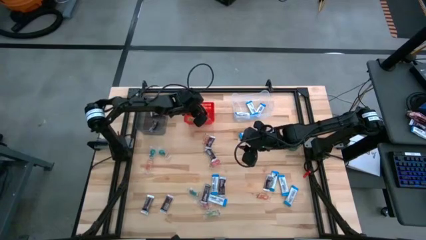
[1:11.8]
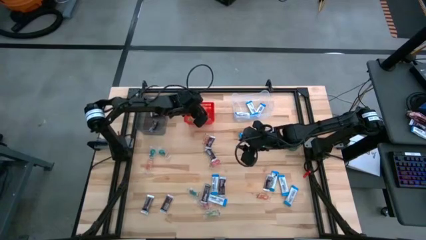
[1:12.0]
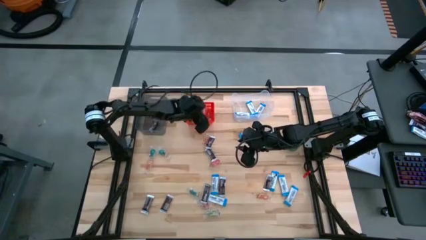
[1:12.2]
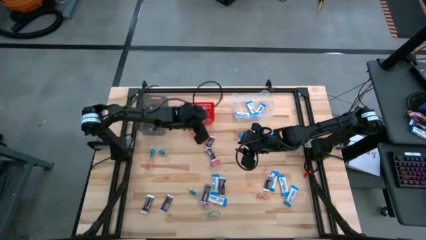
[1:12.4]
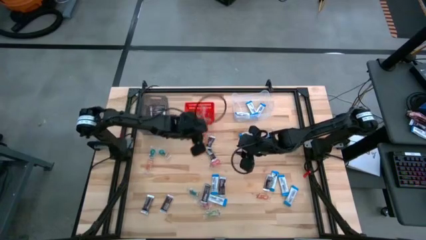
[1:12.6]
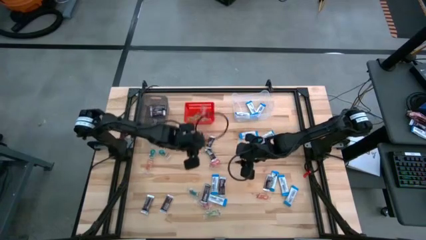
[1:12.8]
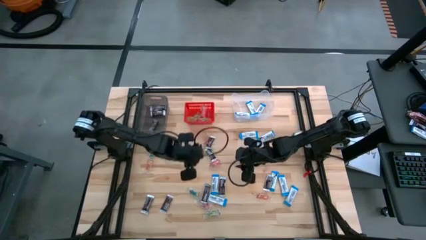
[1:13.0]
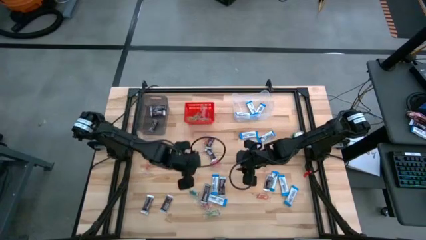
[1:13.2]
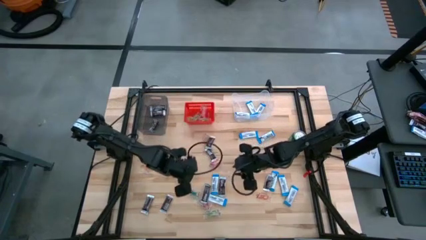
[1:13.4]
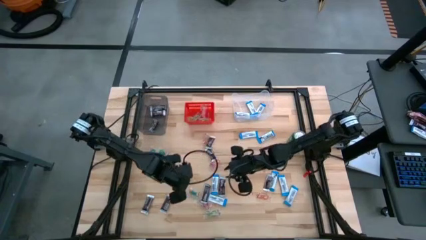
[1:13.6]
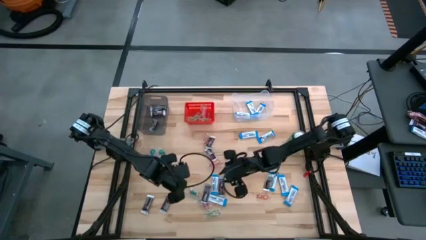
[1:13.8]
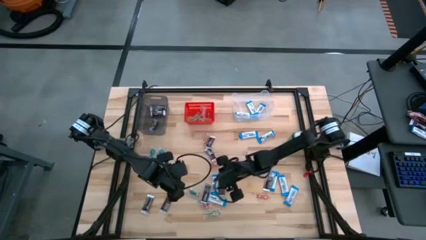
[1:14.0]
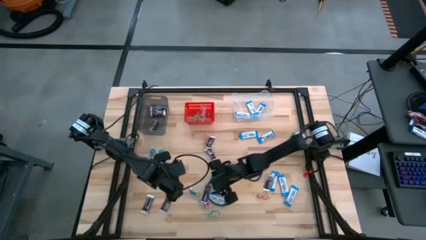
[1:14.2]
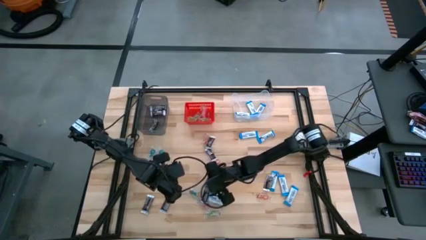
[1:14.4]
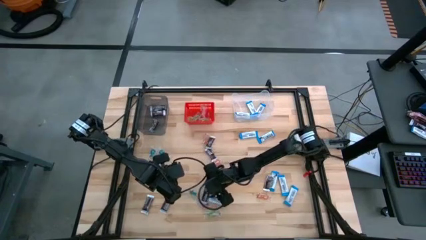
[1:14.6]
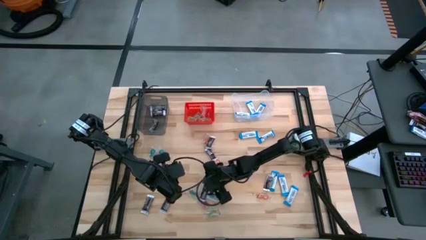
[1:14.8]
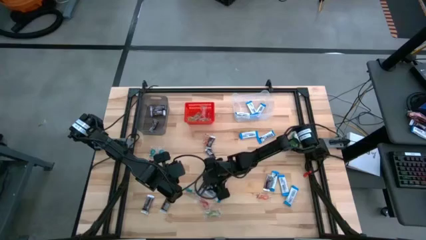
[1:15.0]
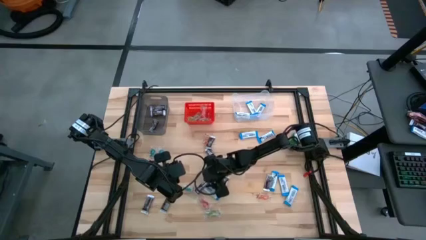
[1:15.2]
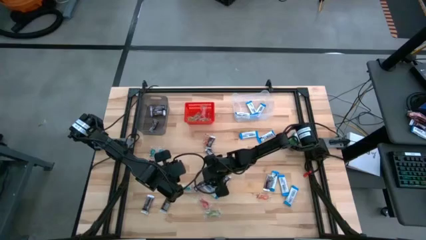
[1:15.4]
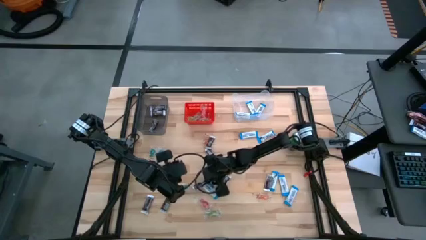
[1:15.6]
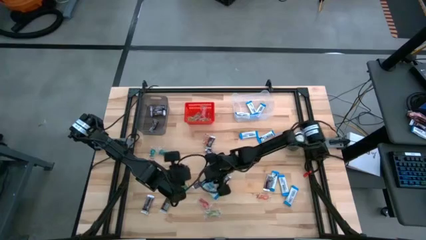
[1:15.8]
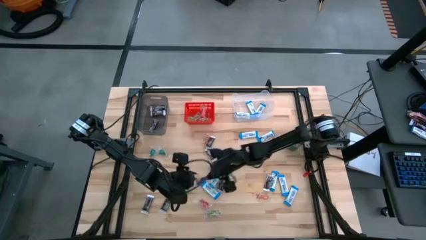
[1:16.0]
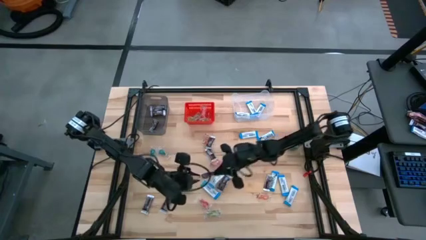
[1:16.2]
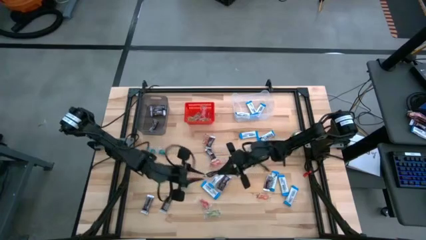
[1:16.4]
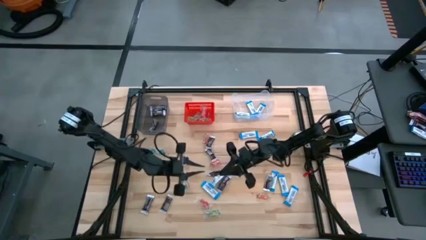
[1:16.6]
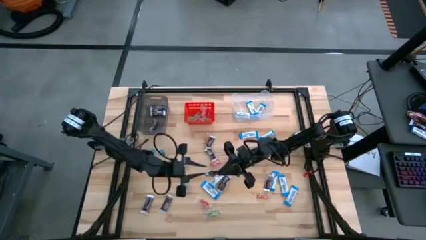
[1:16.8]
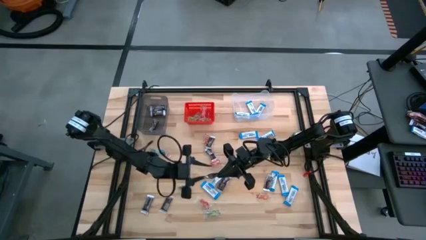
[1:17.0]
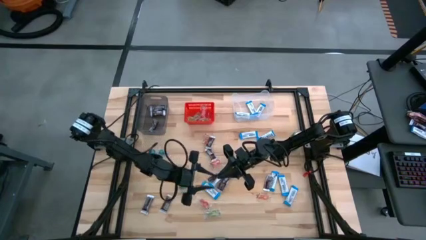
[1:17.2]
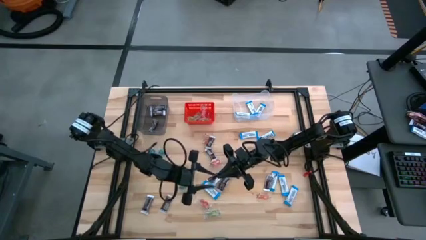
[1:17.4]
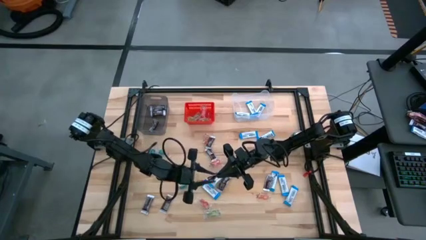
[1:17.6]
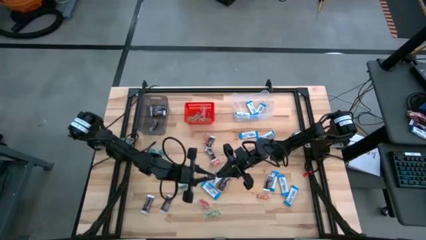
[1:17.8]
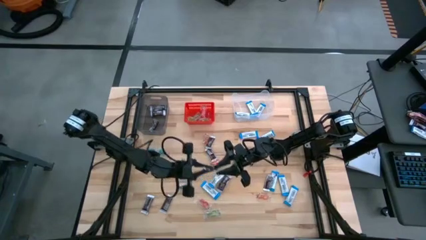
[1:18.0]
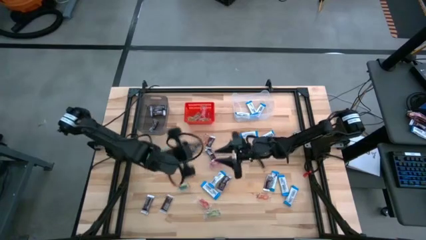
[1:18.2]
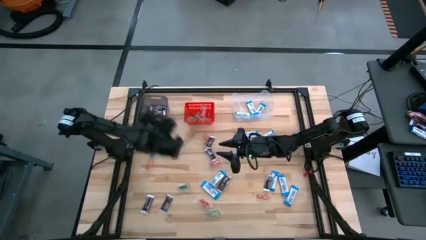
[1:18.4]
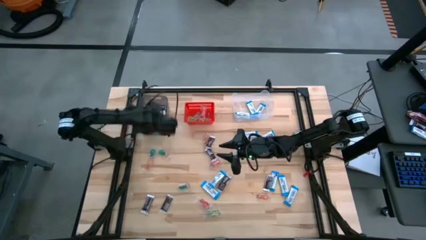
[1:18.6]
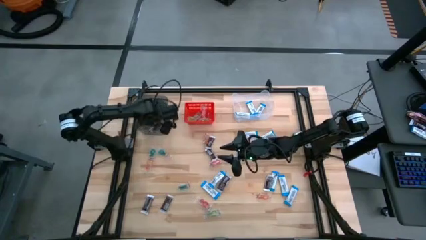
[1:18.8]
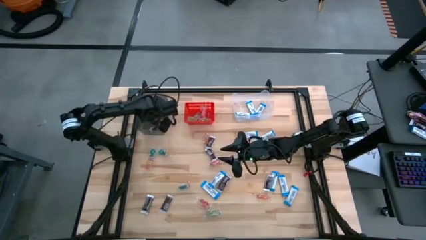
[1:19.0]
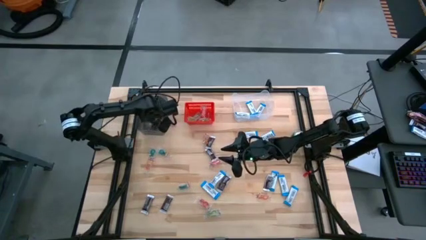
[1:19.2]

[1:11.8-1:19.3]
Task: Sort candy
Put the brown chocolate into the black bin

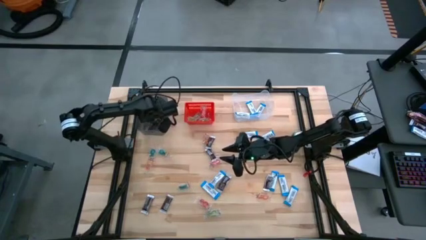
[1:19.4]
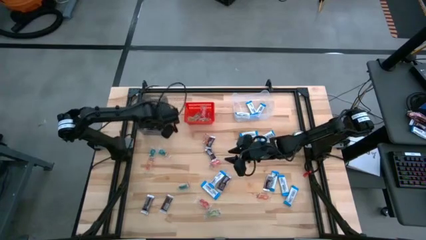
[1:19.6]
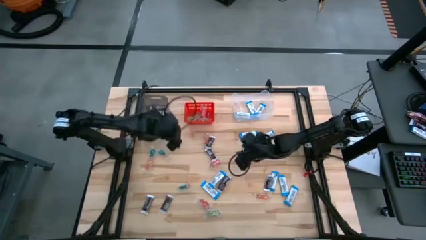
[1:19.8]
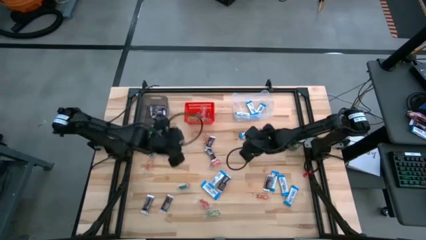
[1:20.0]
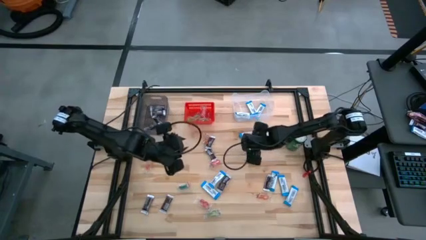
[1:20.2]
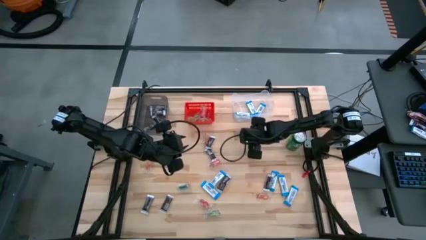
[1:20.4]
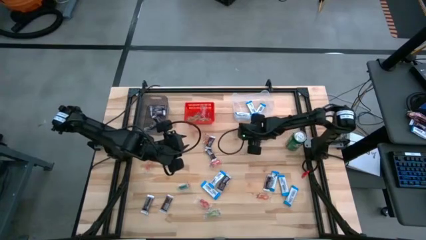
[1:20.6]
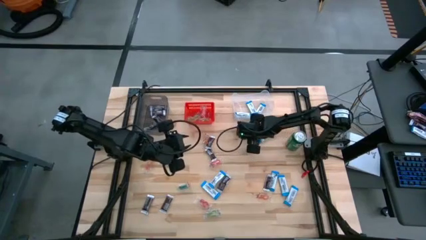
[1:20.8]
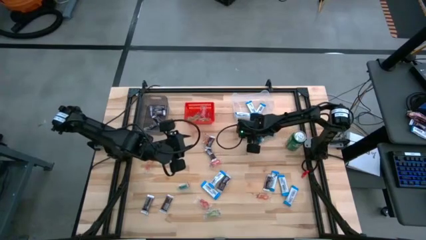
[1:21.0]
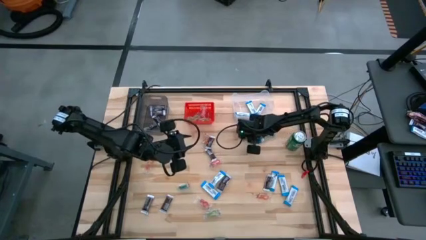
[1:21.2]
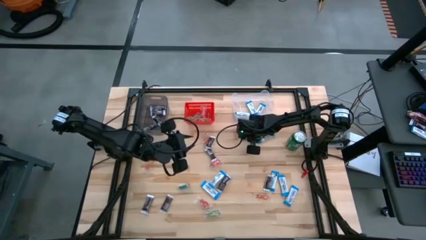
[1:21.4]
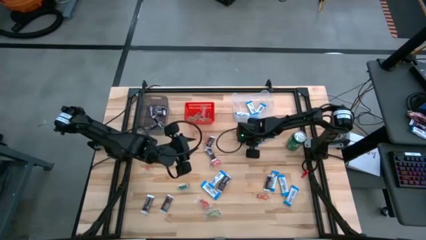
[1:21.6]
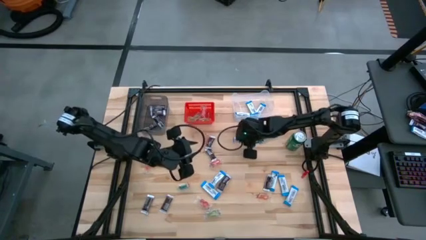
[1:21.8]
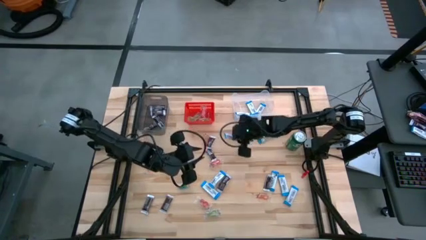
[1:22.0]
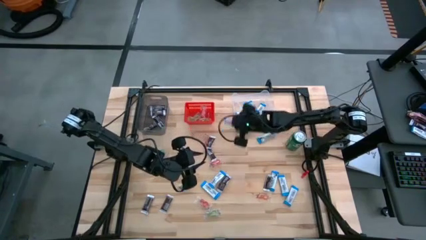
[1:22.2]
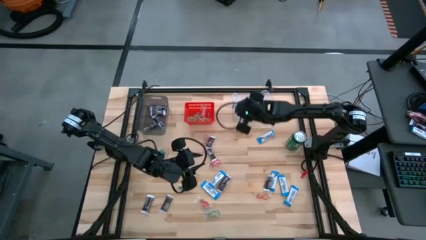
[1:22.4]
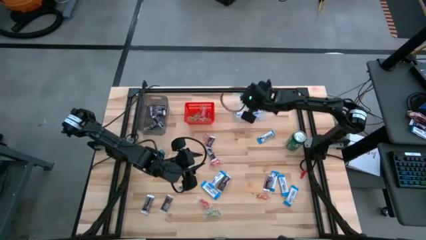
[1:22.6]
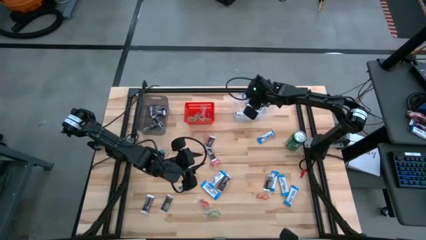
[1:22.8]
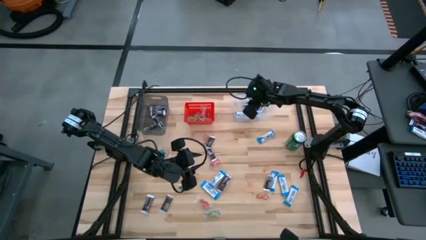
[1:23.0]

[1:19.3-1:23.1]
Put the white chocolate into the transparent bin

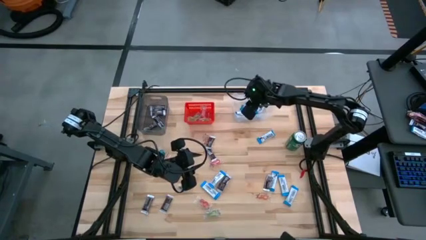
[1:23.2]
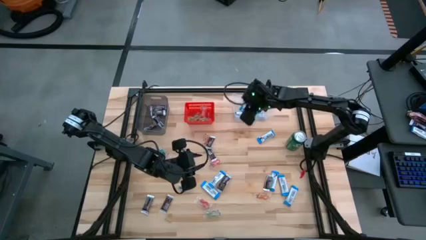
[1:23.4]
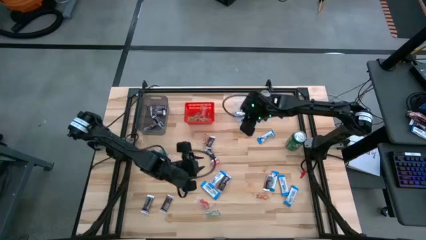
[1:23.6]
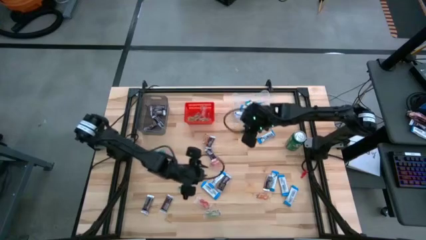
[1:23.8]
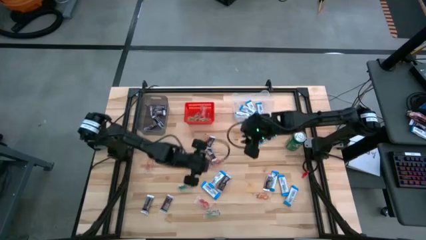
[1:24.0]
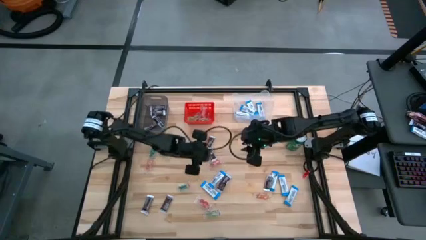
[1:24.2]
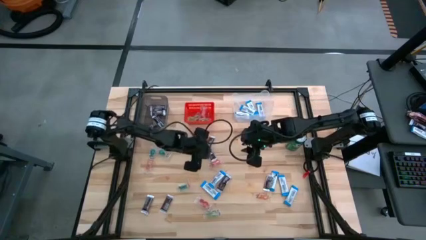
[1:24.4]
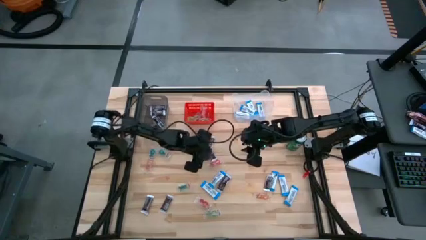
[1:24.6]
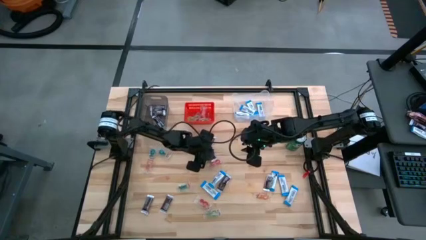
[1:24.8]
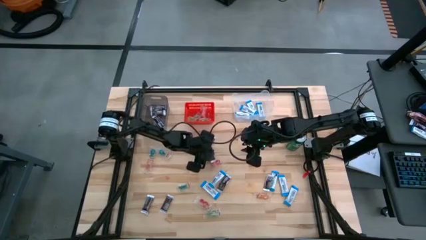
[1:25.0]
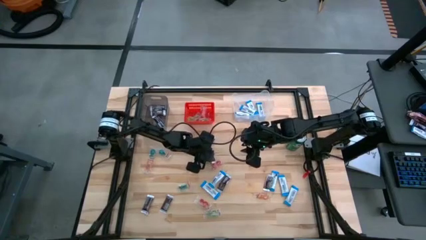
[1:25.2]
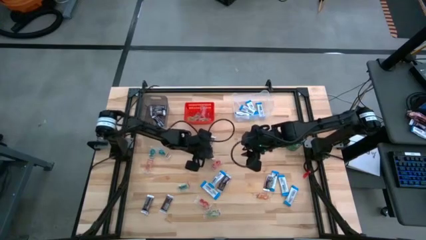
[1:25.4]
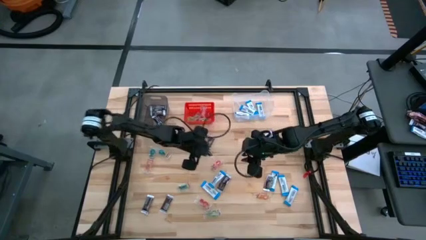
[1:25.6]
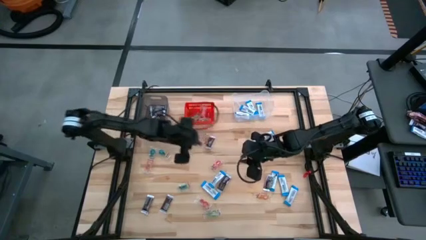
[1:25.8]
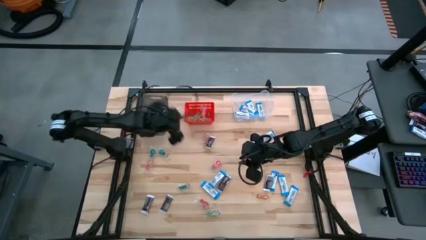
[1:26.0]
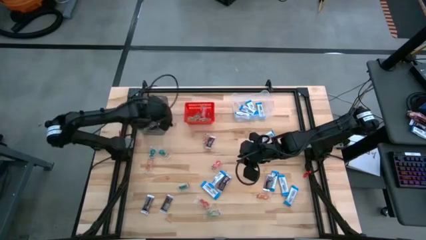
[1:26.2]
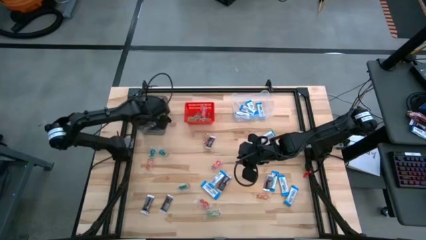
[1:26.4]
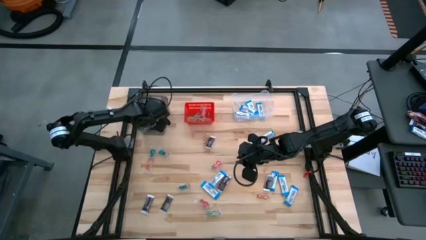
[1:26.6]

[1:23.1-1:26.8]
Put the brown chocolate into the black bin

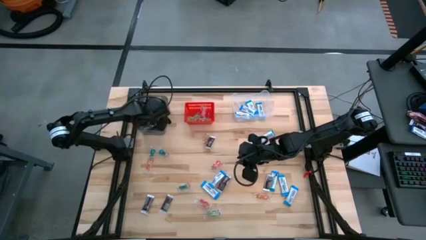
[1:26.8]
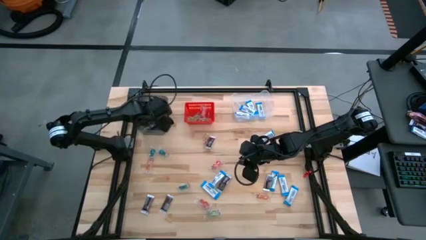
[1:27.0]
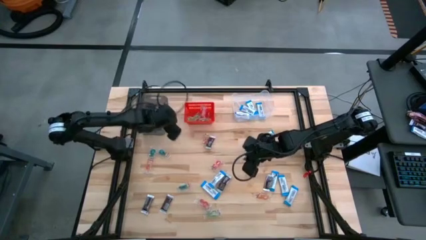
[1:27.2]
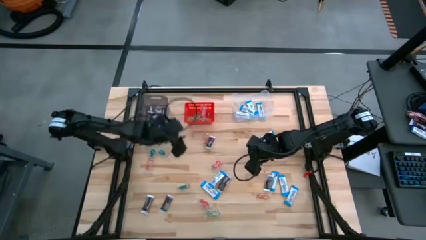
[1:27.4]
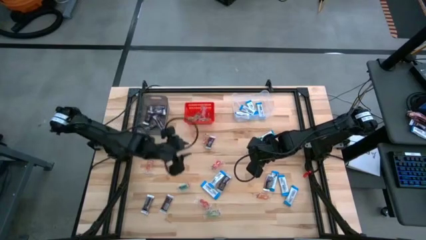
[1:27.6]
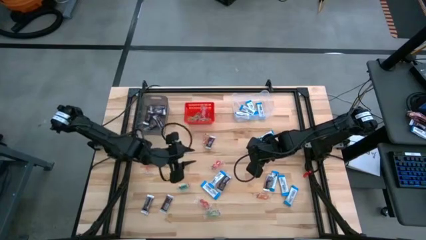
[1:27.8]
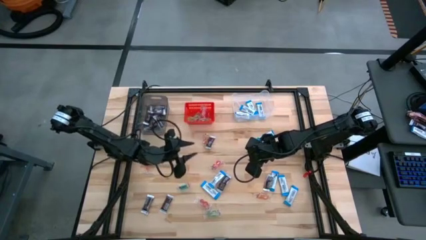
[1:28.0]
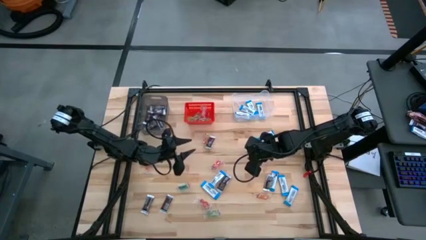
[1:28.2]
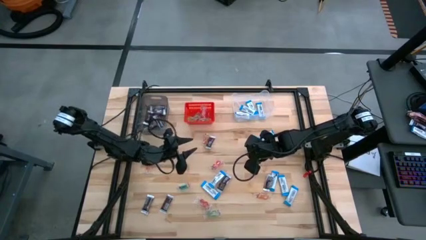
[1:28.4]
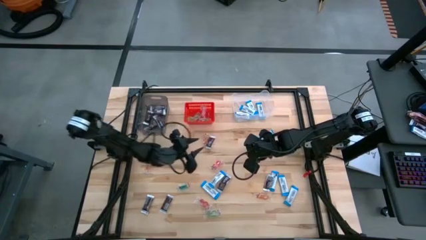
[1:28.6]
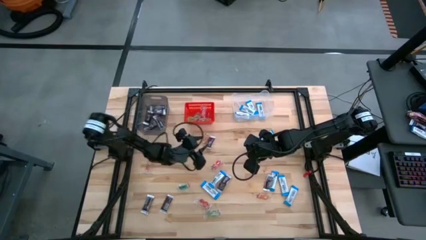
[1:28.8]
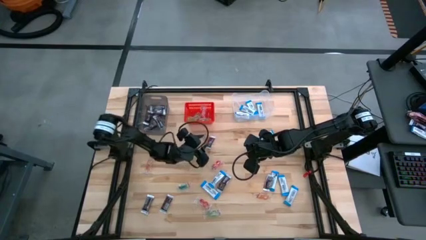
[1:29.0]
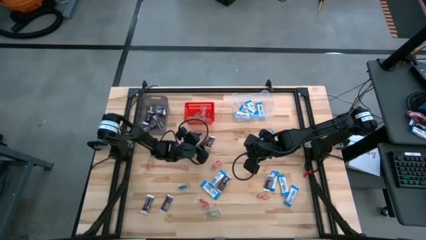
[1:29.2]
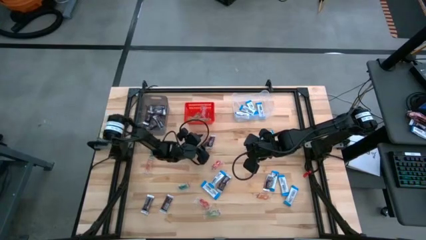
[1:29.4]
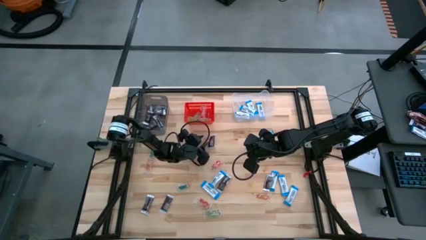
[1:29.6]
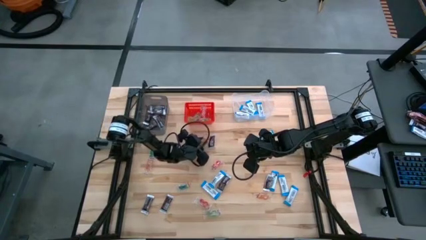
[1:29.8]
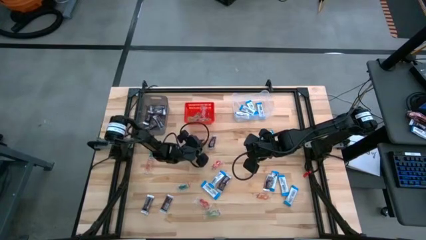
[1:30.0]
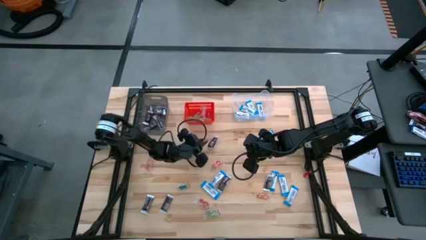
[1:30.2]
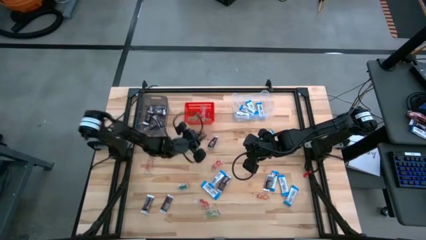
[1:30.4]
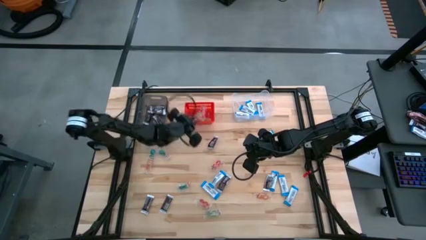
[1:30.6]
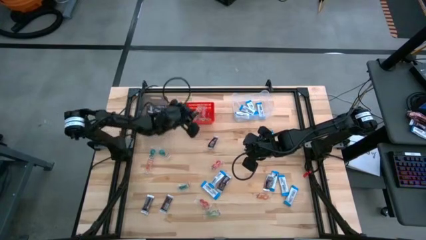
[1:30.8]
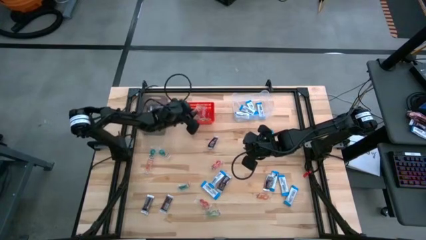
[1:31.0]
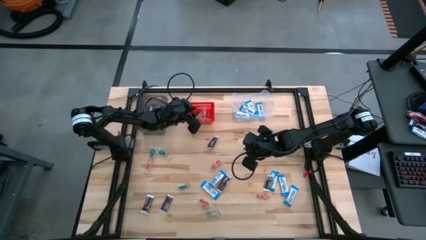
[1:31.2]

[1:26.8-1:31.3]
Put the orange gummy into the red bin
